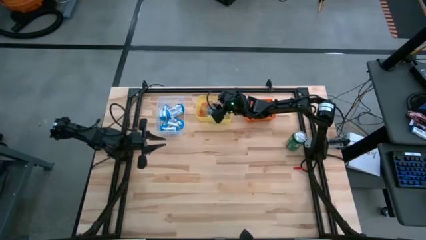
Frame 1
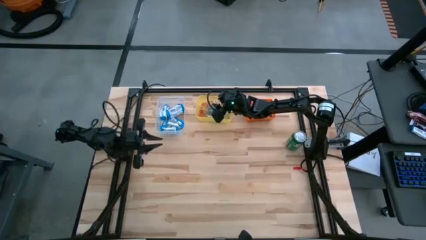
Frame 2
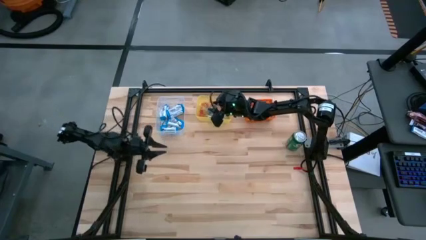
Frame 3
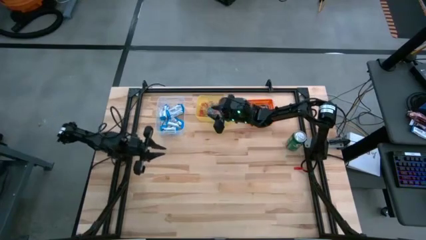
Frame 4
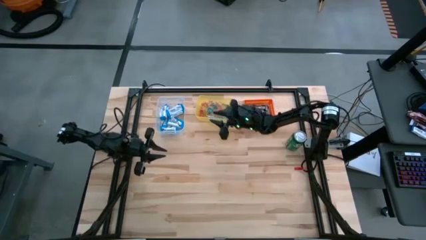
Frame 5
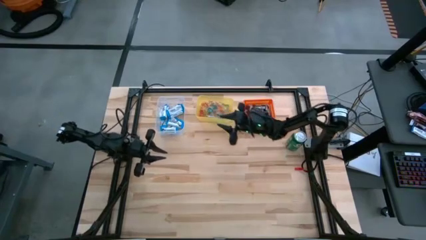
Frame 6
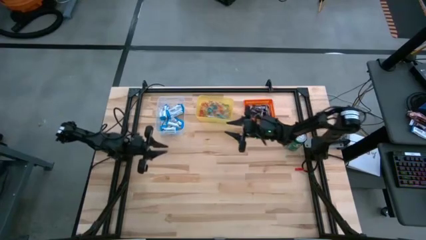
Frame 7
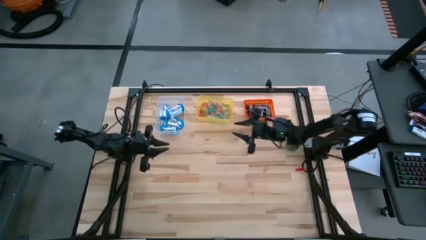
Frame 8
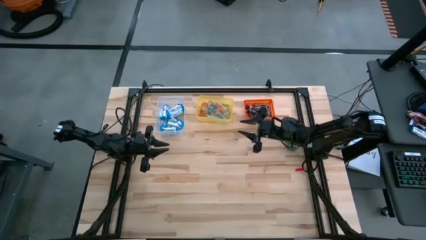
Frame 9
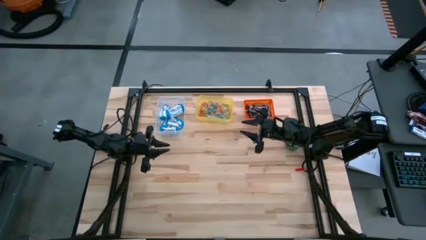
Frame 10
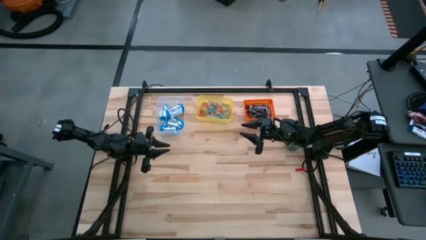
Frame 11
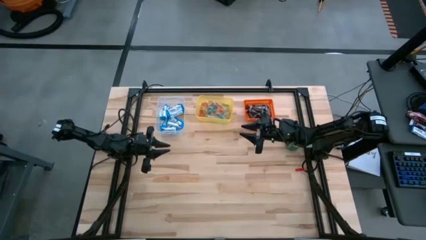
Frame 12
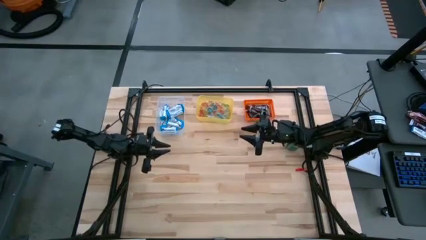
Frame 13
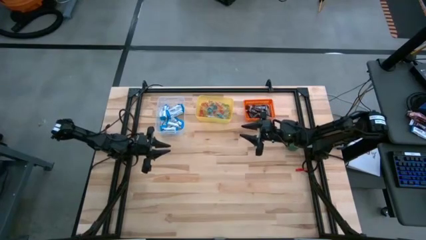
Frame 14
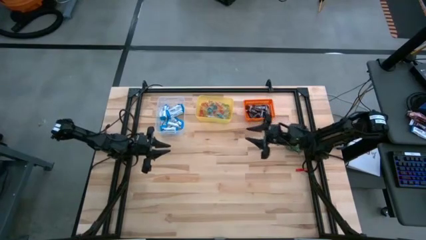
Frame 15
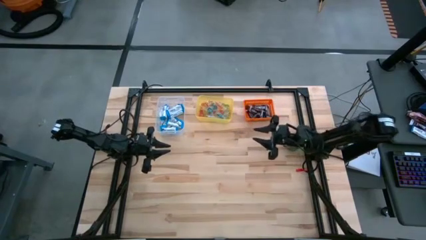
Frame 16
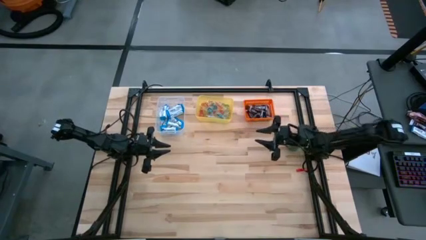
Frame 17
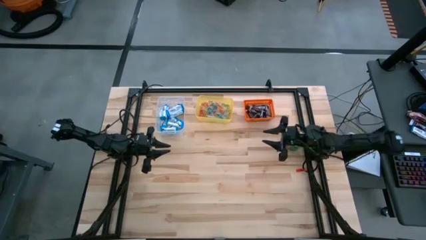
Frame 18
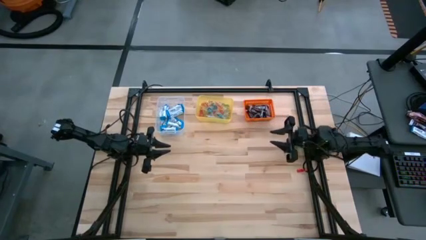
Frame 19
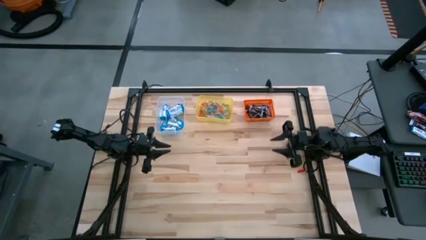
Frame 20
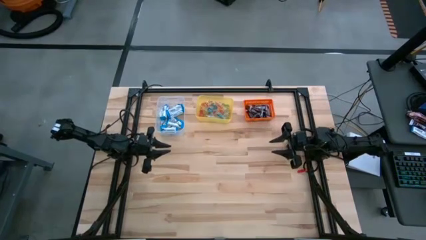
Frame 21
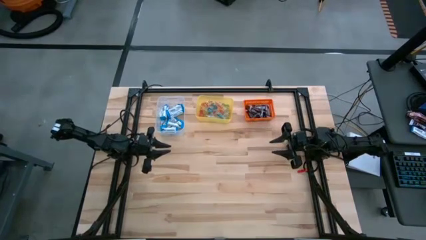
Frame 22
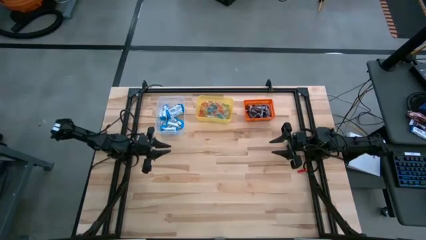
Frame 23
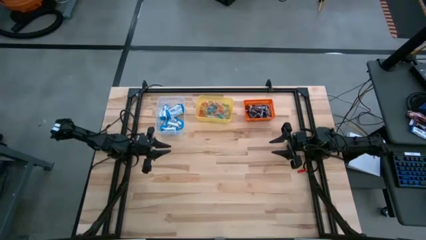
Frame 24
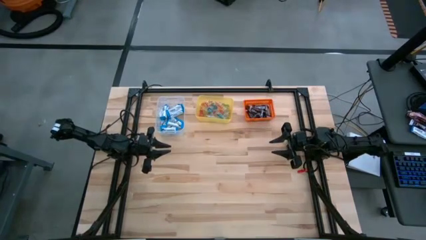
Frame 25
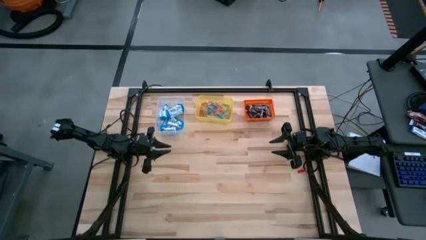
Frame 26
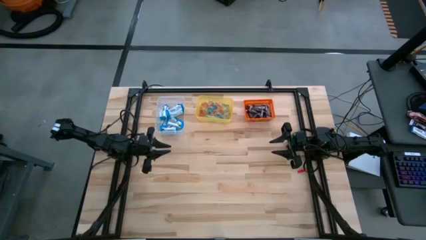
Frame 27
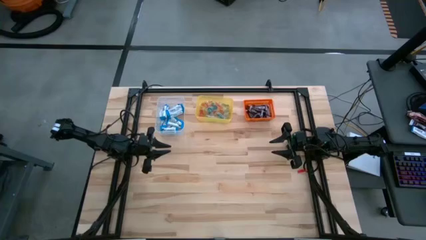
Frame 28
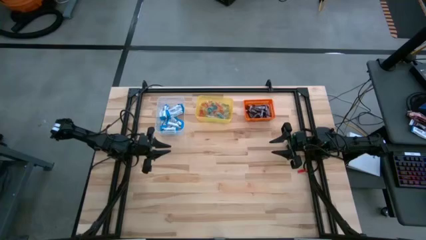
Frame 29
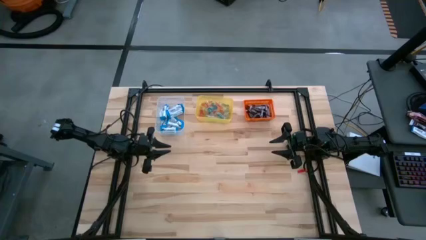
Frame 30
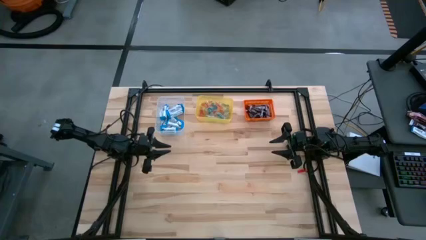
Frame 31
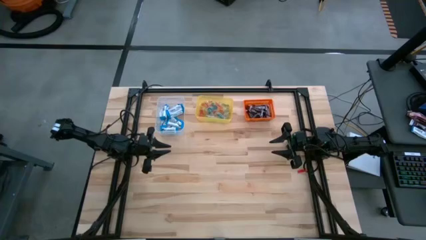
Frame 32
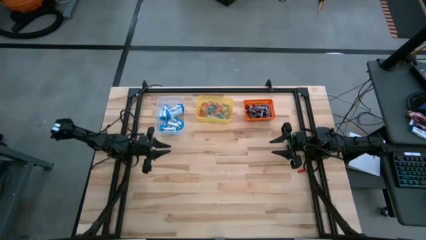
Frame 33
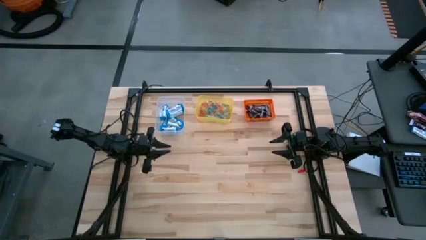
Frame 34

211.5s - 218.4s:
Task: Sort candy
Return to Home Position

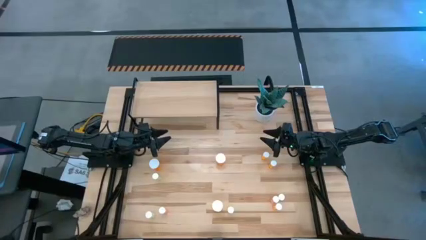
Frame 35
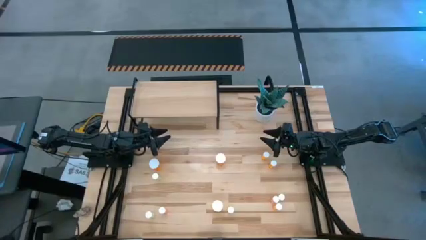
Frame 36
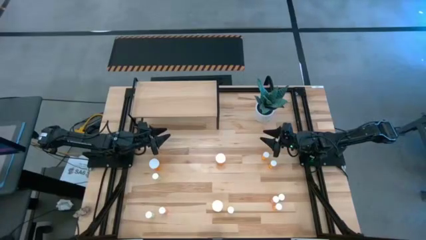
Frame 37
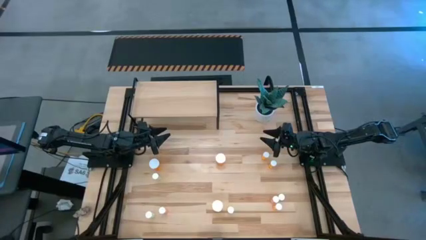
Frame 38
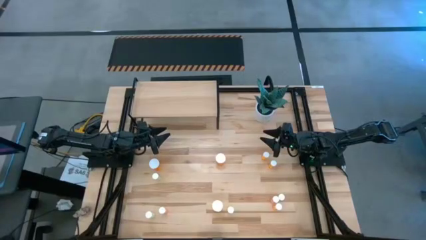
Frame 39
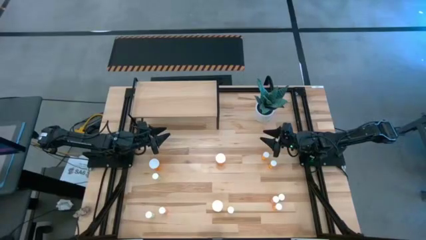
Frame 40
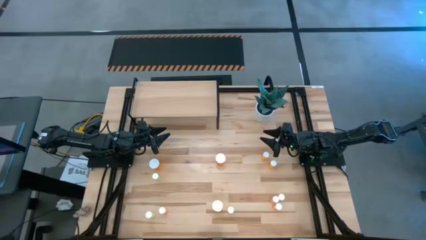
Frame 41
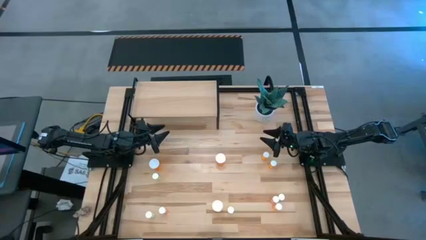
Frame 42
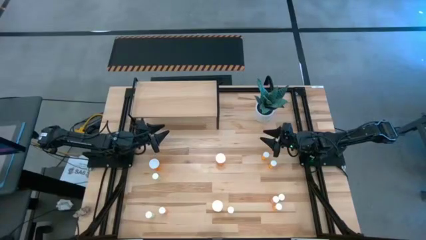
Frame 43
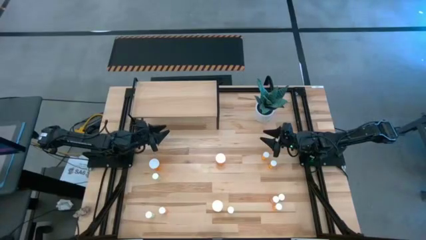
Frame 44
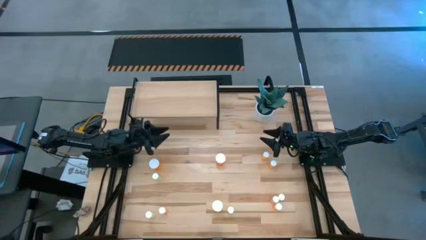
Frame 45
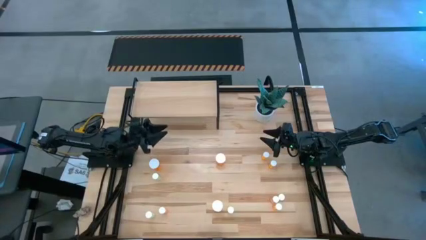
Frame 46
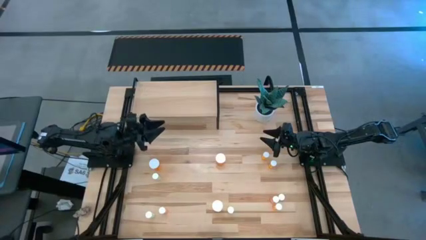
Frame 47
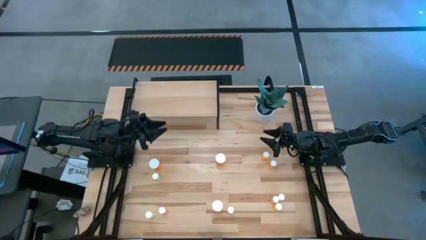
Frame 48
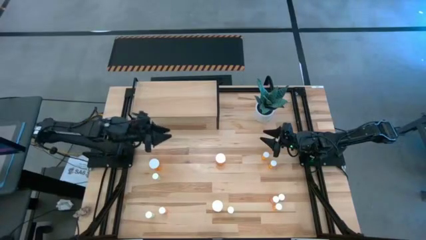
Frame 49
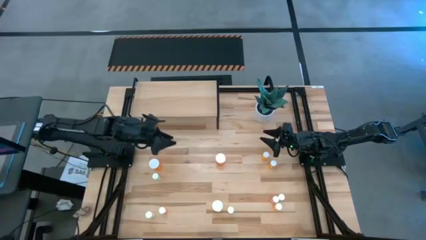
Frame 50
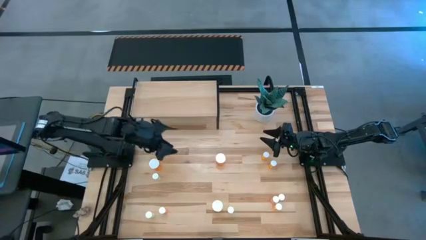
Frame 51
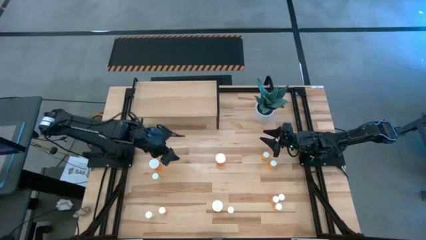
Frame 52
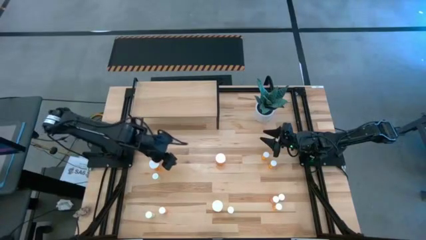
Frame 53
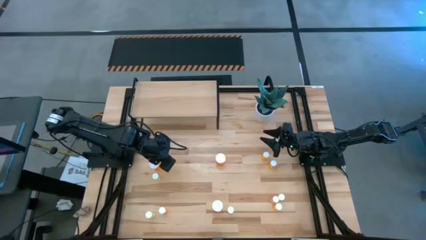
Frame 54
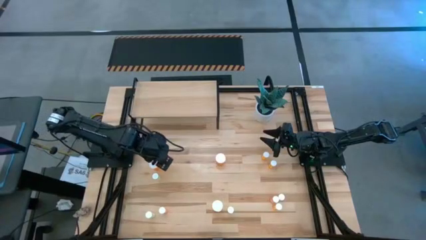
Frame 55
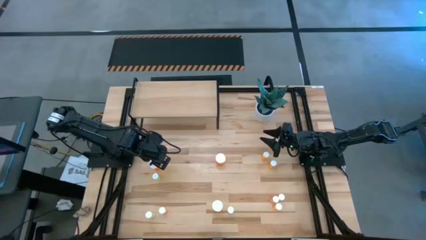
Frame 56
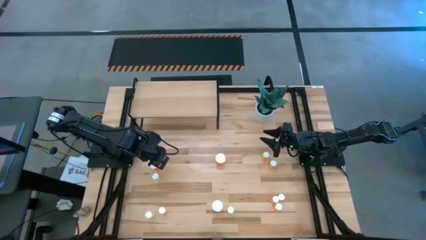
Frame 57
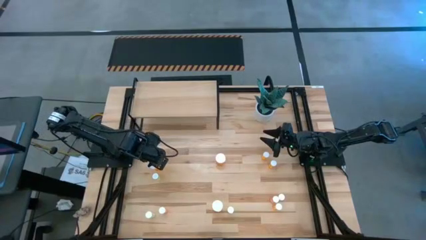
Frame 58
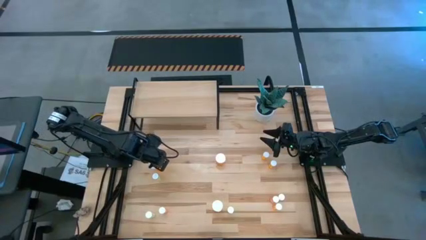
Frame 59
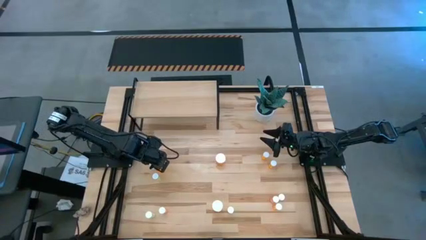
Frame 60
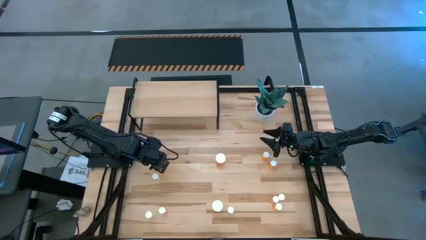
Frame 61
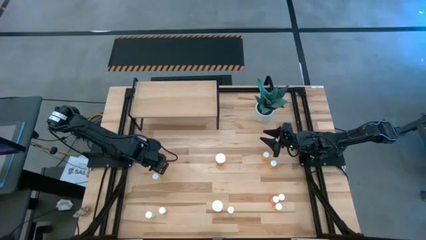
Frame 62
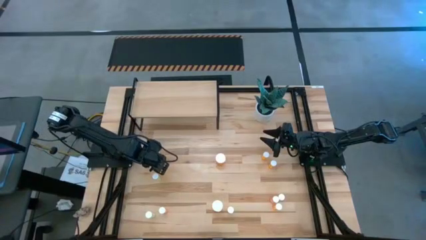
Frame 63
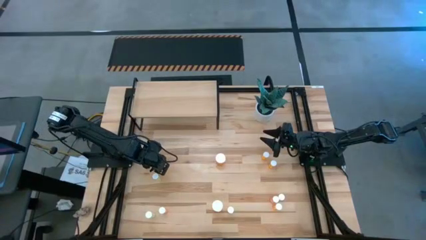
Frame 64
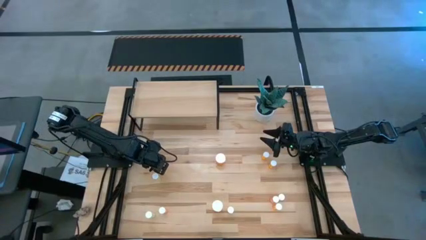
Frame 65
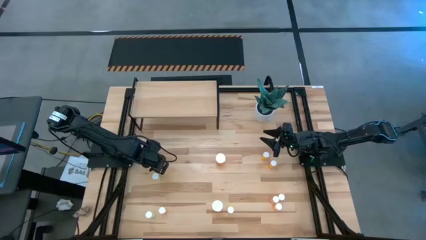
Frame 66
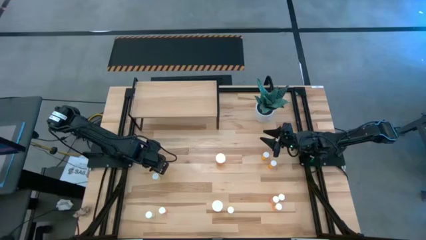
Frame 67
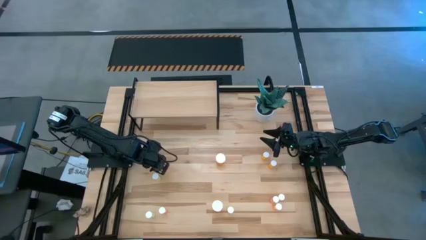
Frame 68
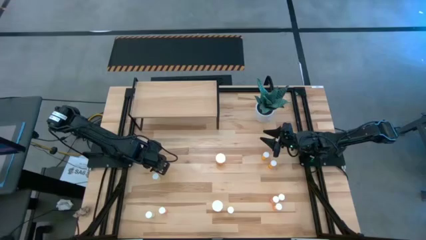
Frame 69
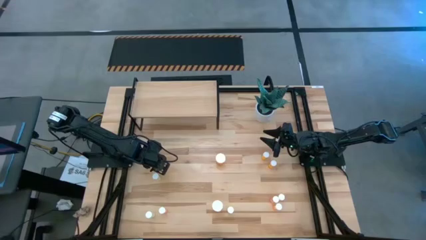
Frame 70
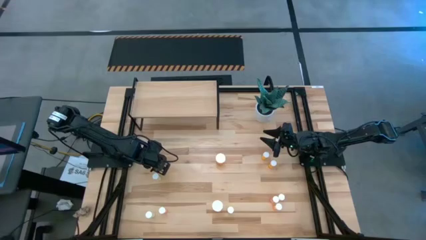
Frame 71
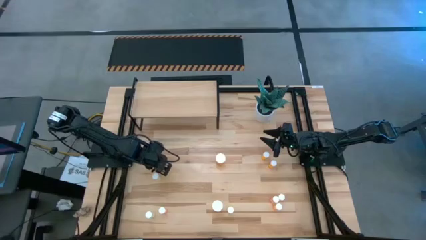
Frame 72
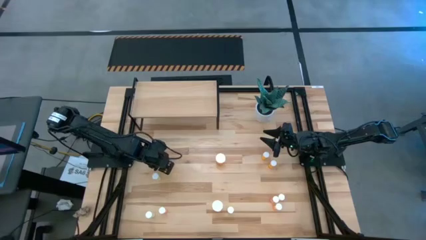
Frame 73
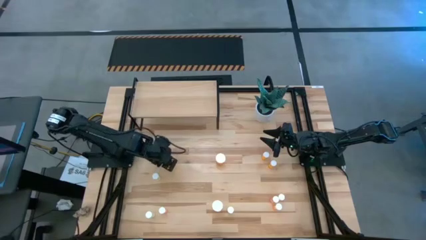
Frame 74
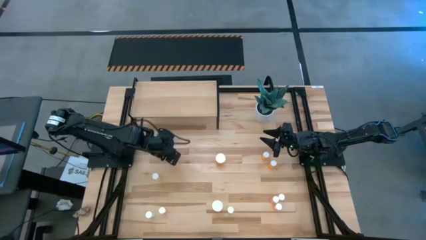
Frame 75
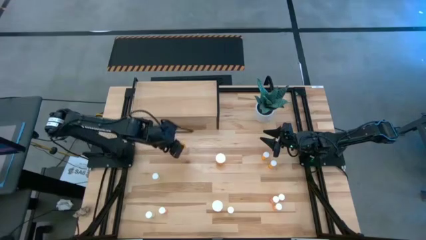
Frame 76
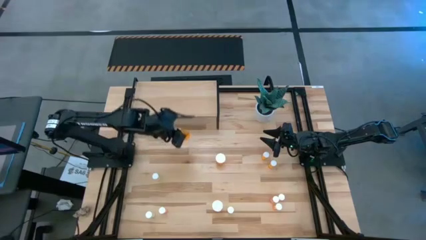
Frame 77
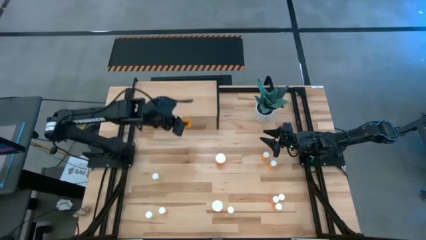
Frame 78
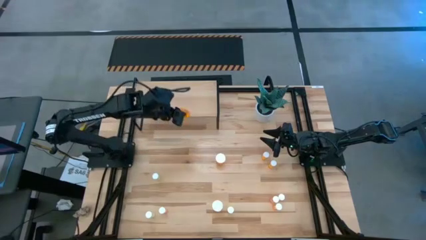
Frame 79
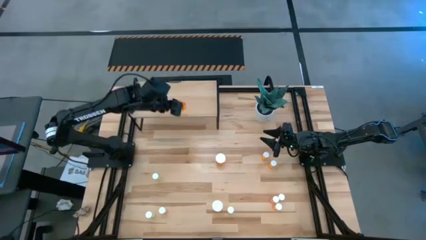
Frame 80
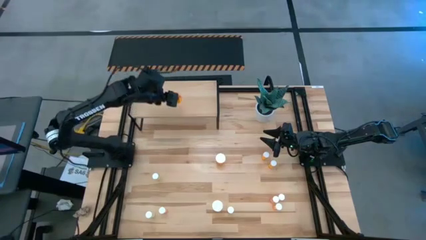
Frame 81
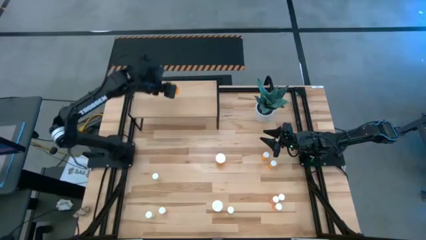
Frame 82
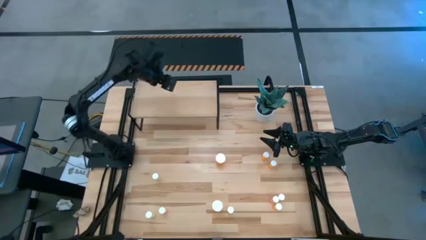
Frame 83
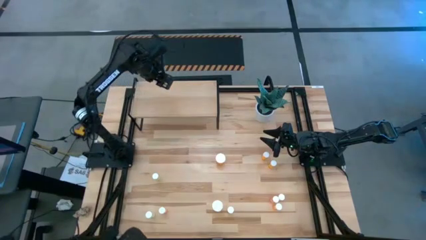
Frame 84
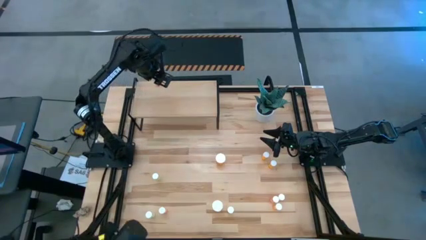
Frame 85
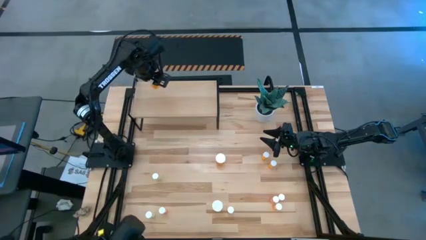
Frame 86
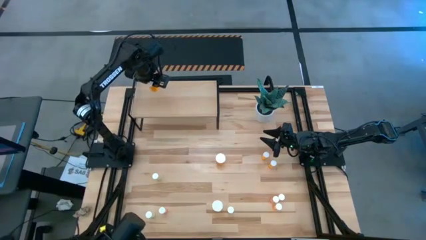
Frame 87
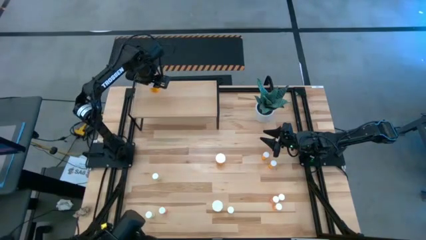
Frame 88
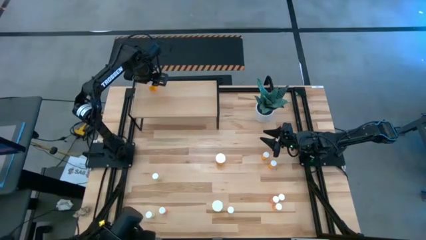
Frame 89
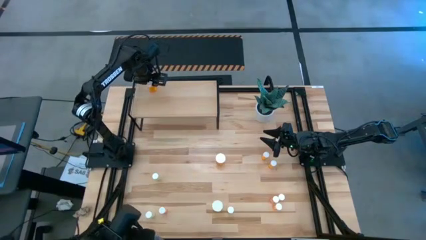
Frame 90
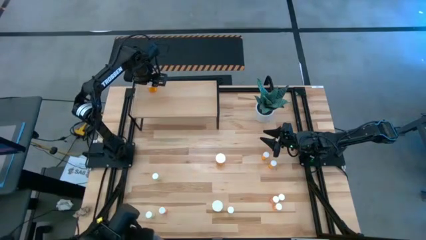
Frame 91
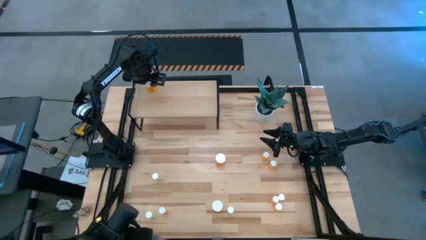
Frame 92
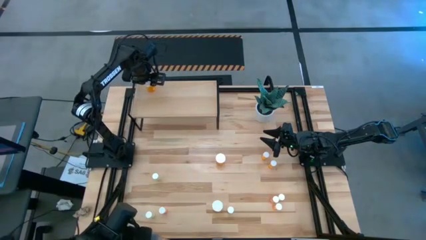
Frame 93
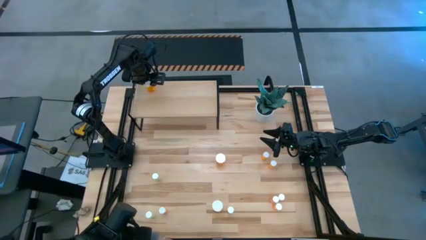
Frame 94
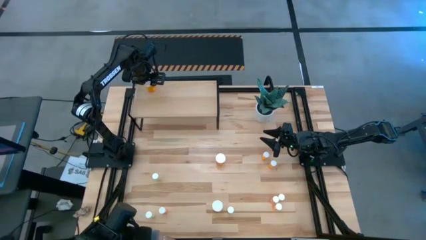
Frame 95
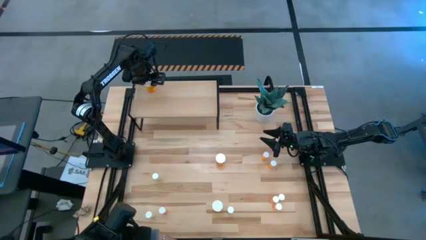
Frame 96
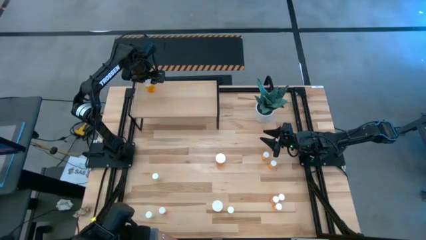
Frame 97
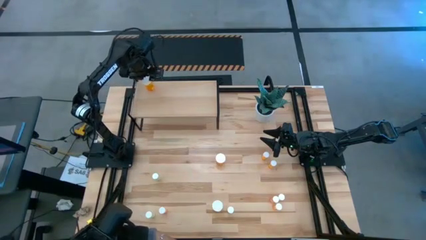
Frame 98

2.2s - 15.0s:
Task: Pick and place medicine bottles onto shelf by color
Put the top left large orange pill bottle on the shelf
